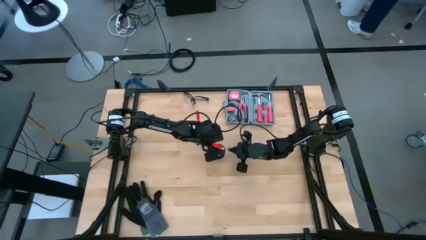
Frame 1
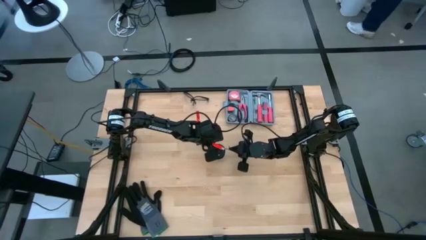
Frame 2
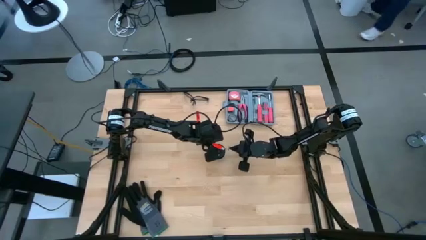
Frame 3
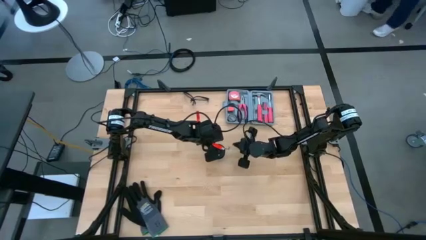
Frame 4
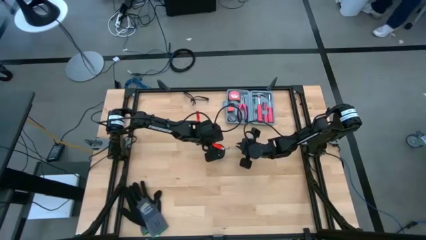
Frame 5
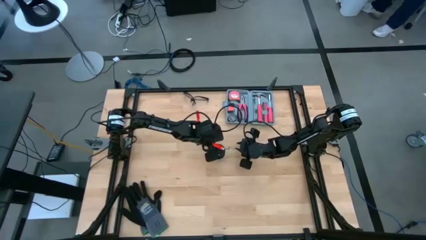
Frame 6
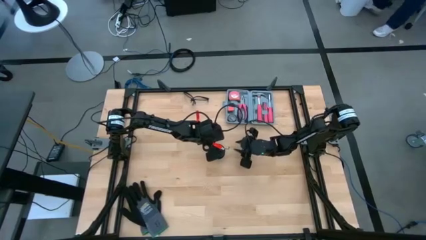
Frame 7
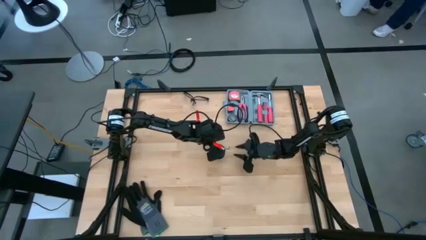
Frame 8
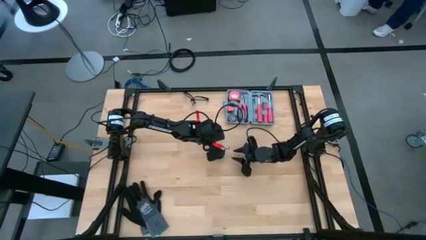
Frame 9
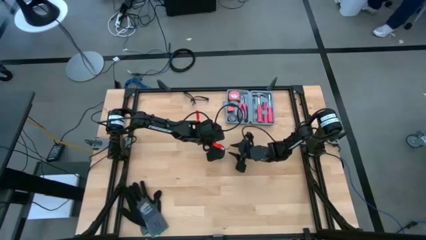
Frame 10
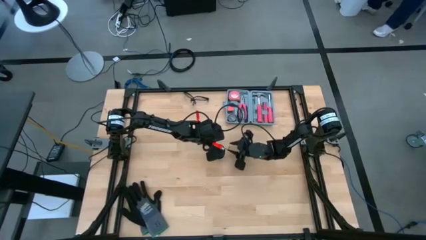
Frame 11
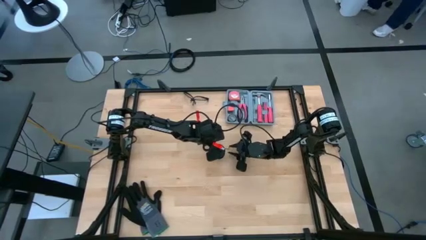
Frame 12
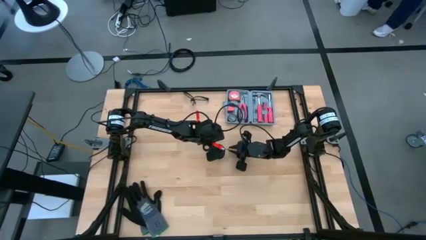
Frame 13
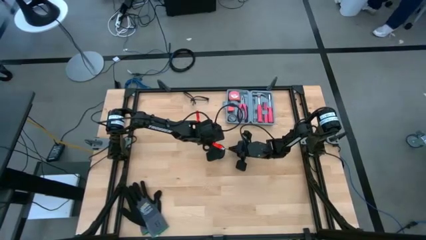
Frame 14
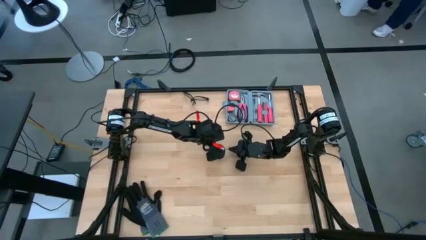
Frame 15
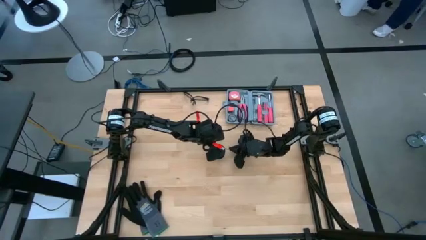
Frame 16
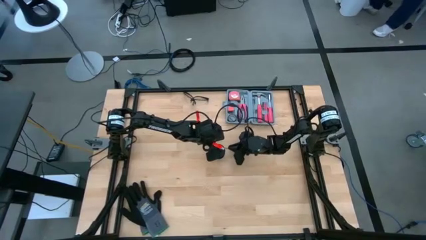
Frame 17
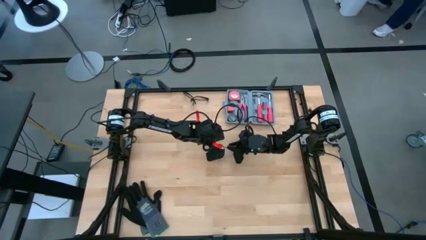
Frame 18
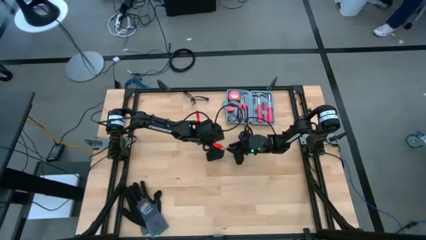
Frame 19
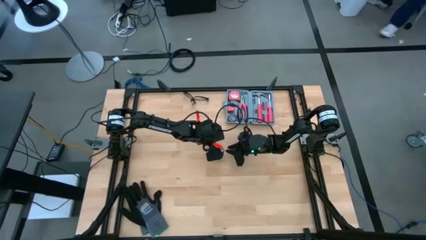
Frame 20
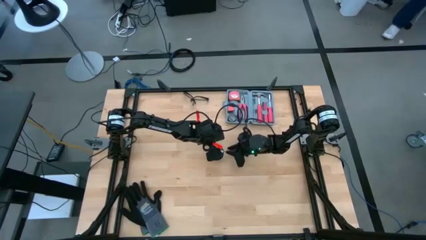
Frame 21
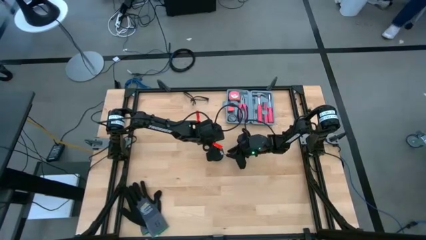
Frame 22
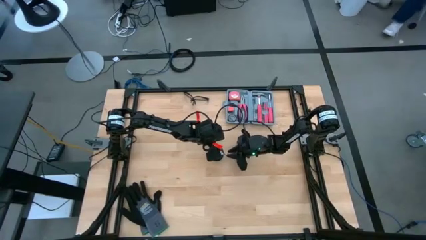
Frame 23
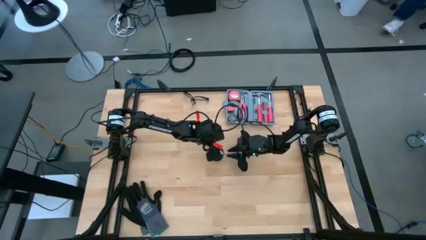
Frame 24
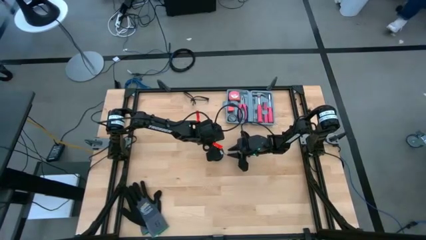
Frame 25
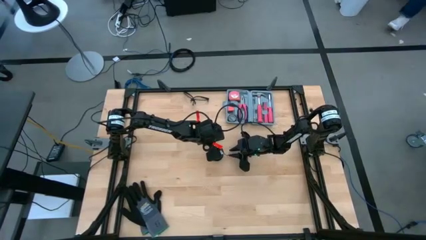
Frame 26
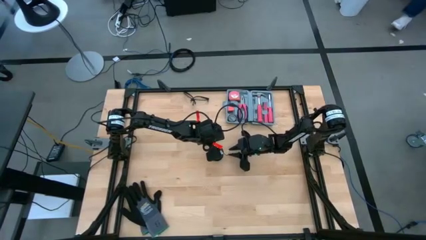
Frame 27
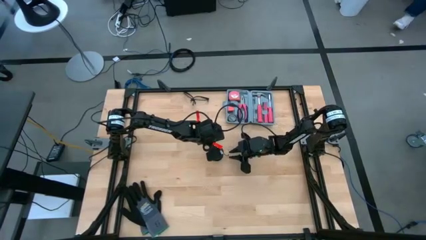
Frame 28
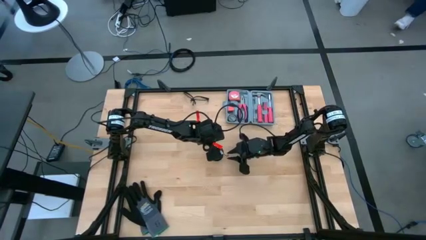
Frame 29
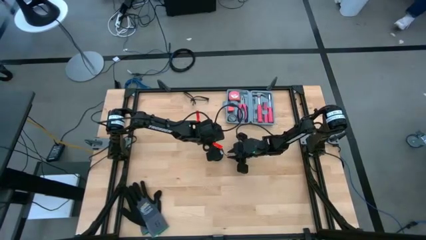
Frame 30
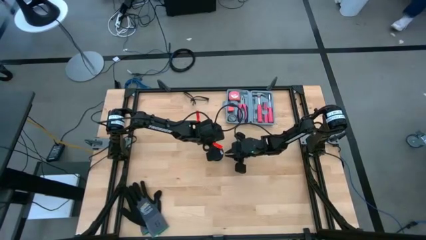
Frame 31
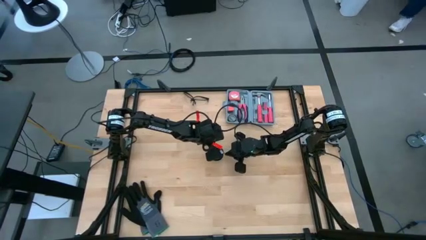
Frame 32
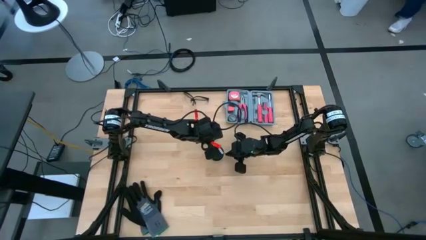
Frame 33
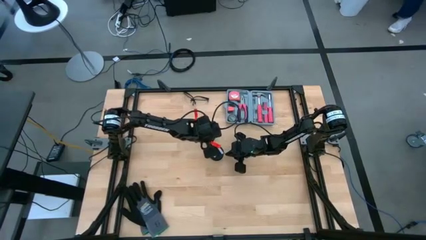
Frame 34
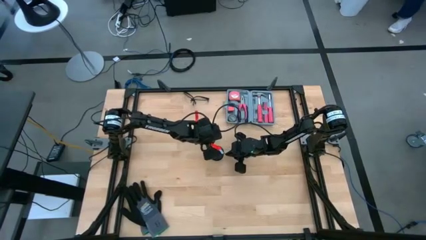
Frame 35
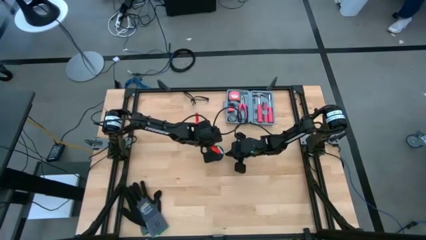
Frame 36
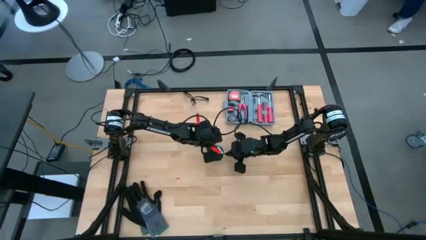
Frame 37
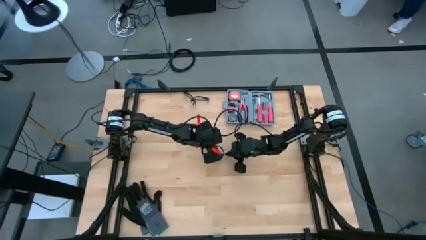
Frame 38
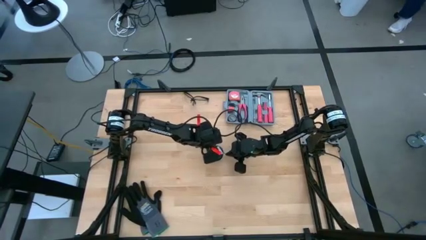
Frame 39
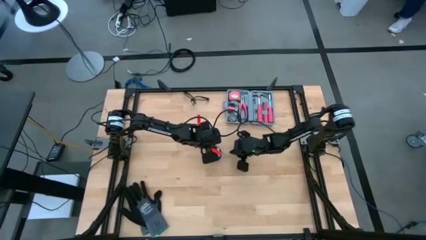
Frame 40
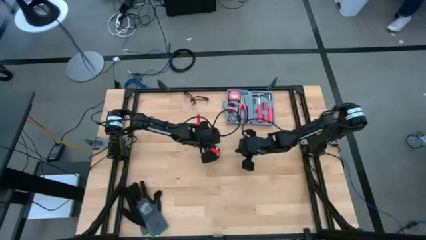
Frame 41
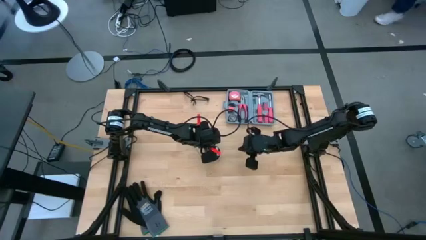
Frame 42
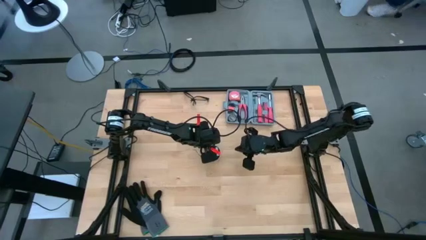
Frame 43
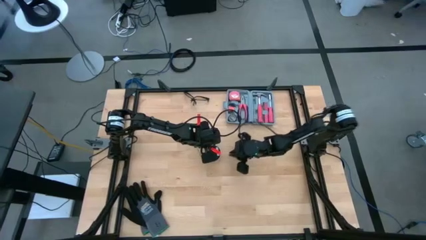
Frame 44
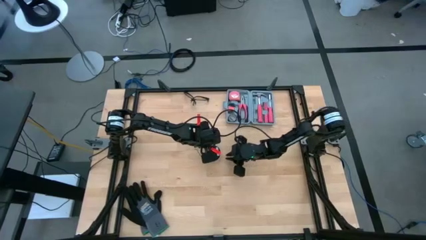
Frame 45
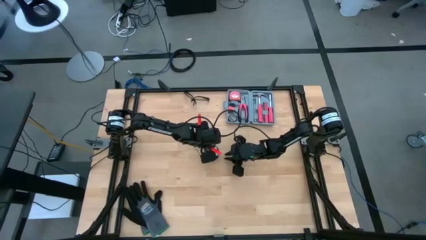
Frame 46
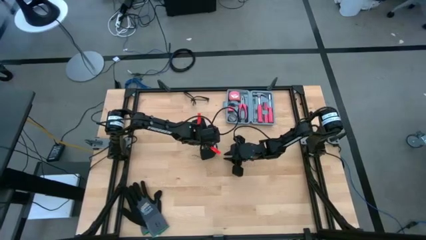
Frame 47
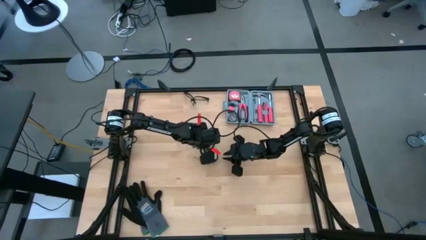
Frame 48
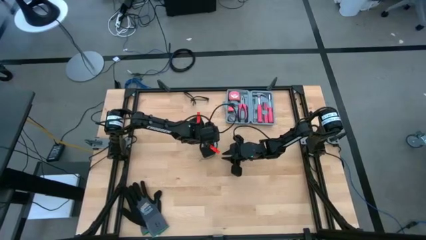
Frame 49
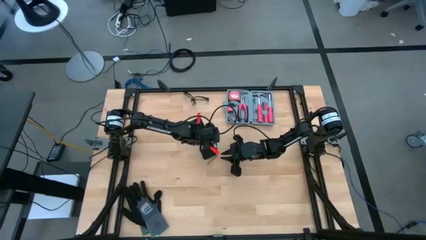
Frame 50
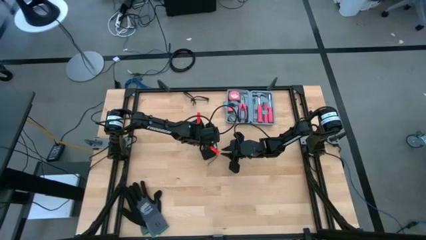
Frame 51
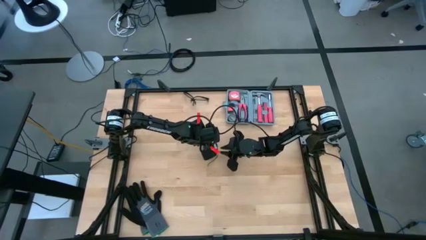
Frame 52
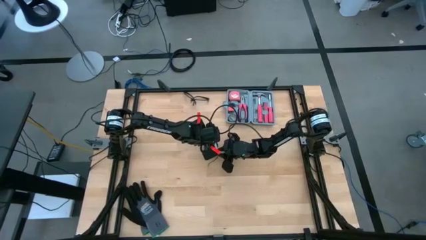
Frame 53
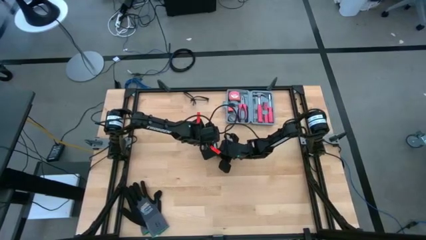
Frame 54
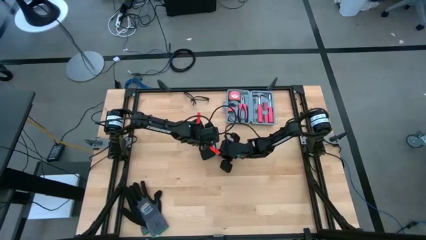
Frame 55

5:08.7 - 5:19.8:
Task: Coil cords
Uncoil the black wire from the spool

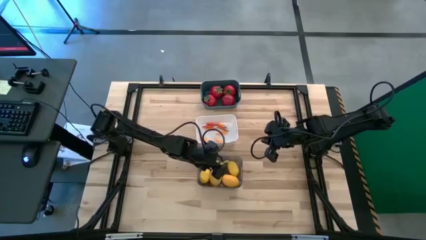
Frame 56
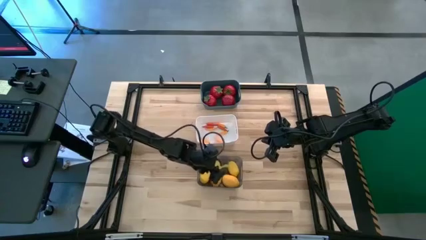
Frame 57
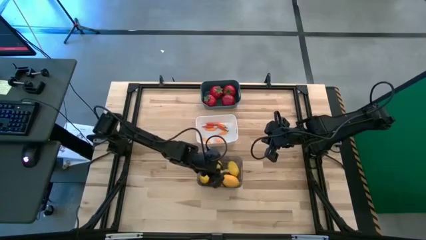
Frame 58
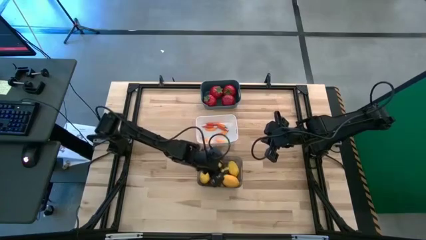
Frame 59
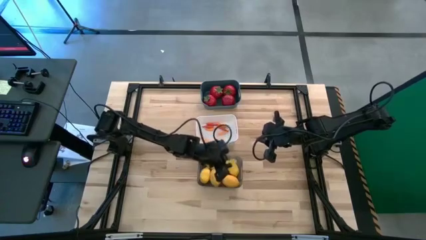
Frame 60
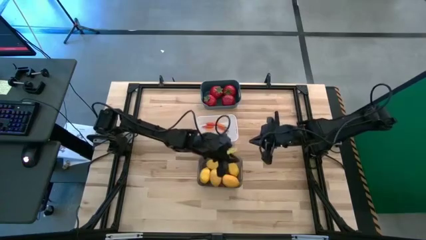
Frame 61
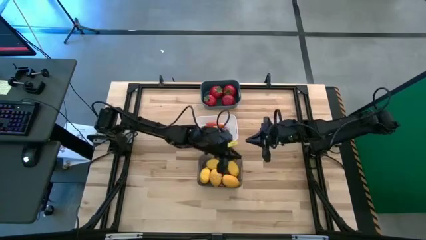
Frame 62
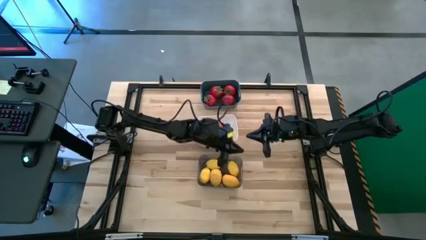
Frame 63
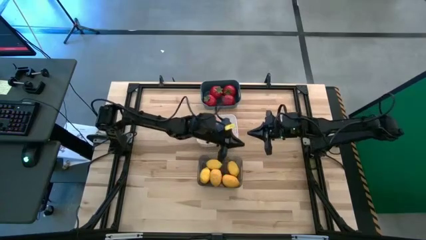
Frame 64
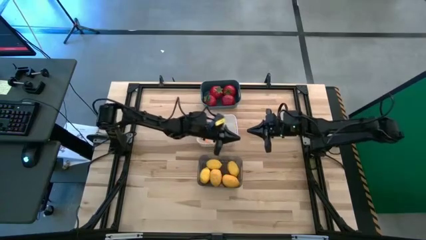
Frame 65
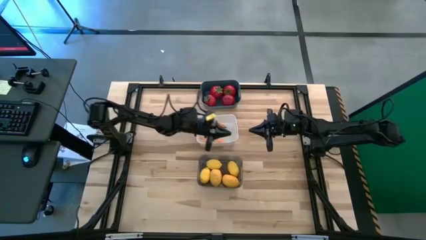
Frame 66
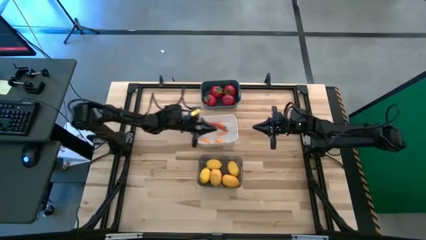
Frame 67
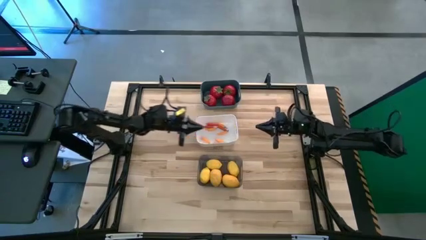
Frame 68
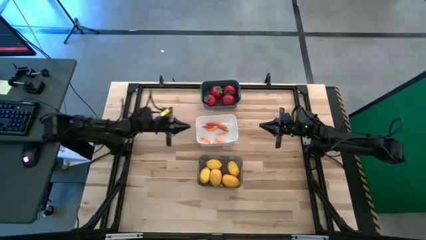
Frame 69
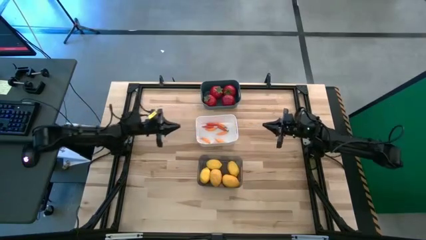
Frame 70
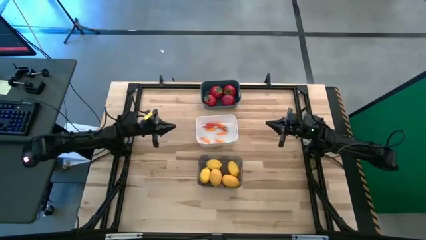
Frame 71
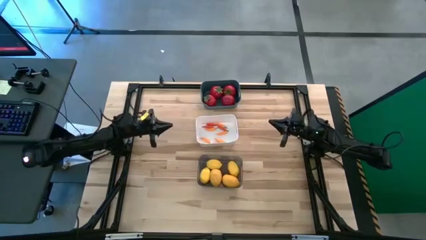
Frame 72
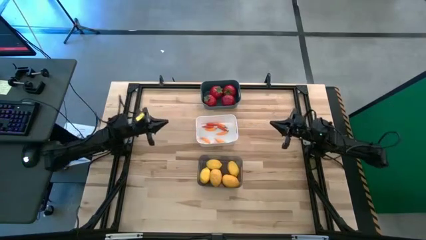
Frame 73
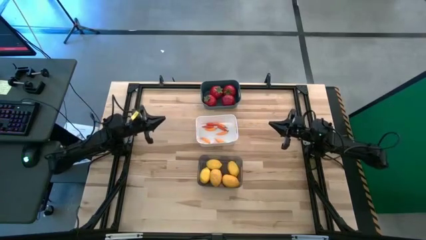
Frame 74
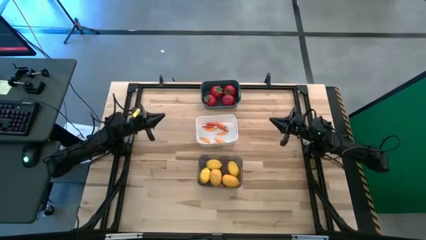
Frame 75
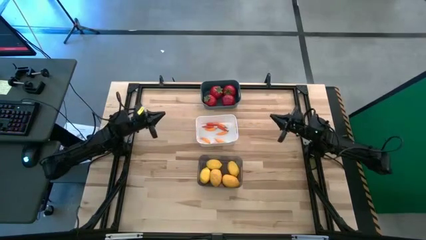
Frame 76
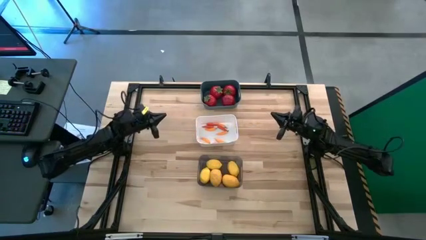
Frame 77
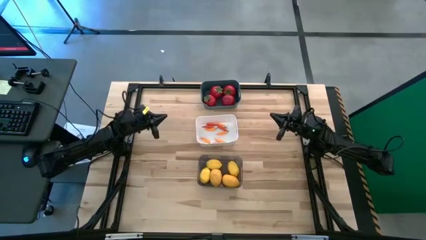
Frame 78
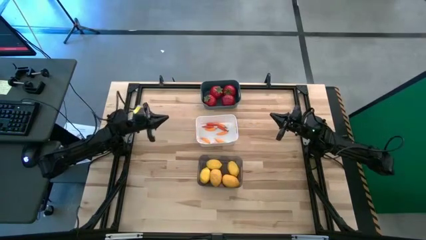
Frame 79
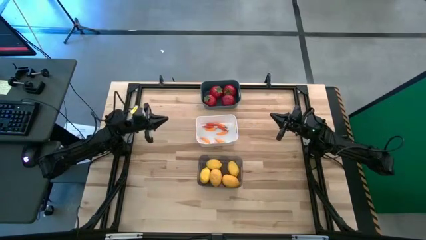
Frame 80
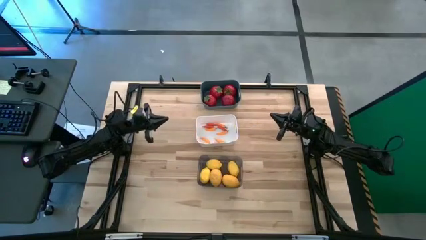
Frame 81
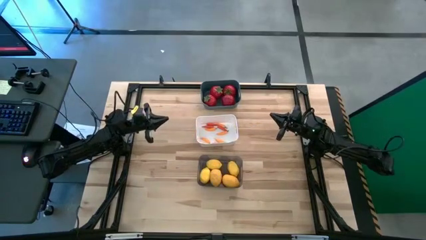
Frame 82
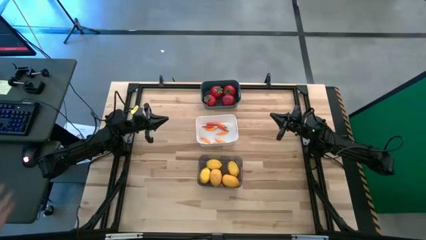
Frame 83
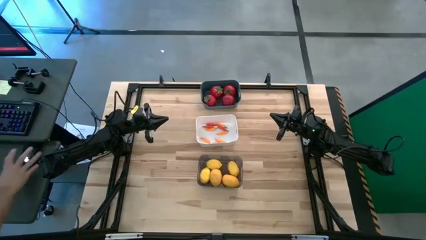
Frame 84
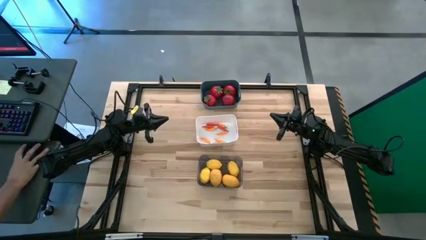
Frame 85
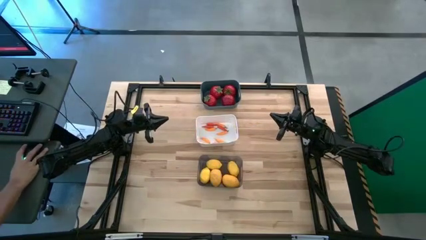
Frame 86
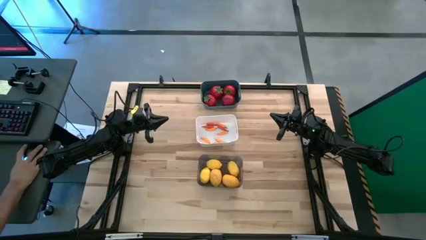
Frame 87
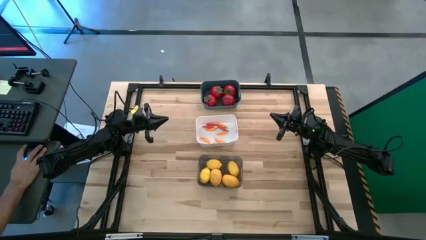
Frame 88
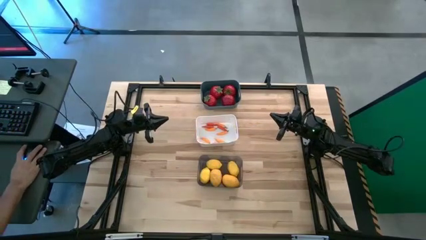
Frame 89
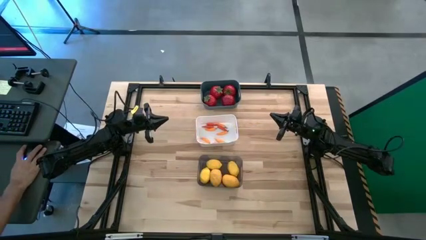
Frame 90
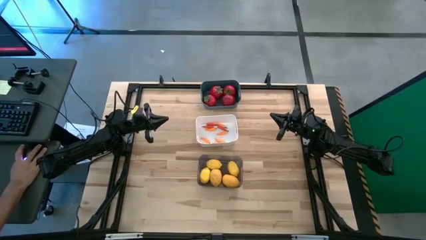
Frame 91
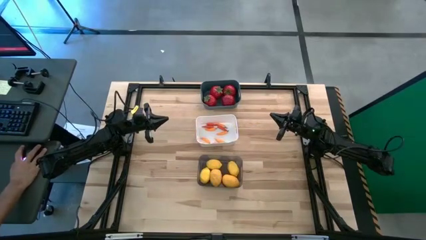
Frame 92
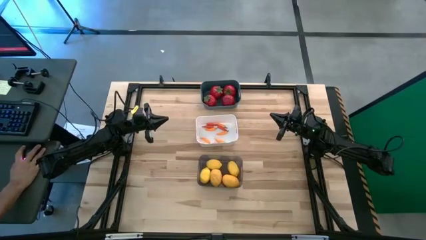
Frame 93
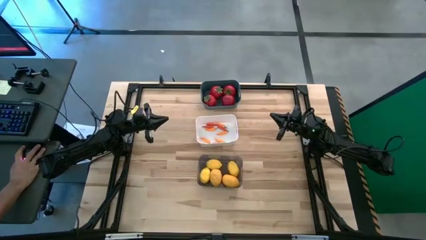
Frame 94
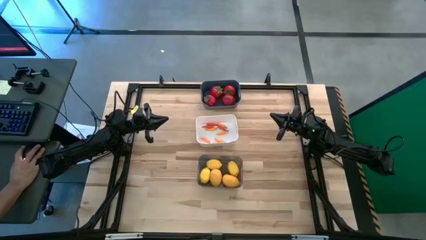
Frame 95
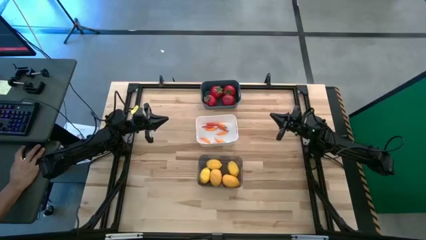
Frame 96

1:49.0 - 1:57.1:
Task: Sort produce into baskets
Return to Home Position
